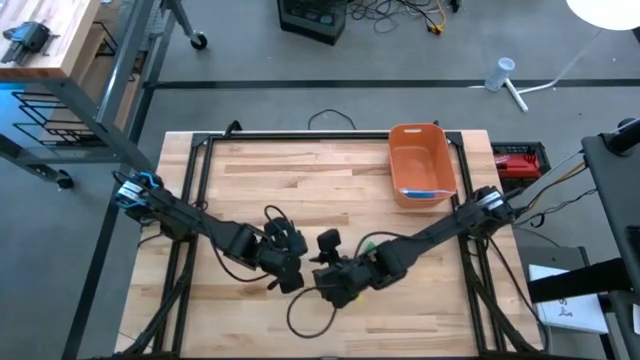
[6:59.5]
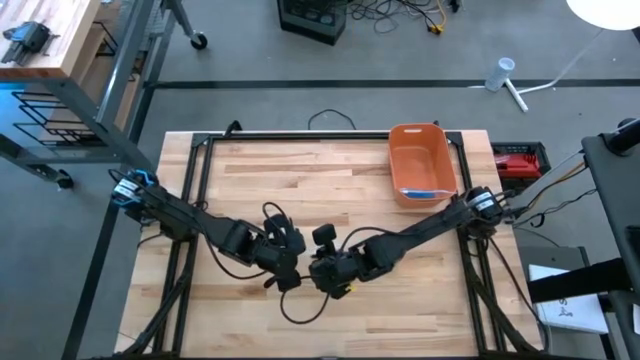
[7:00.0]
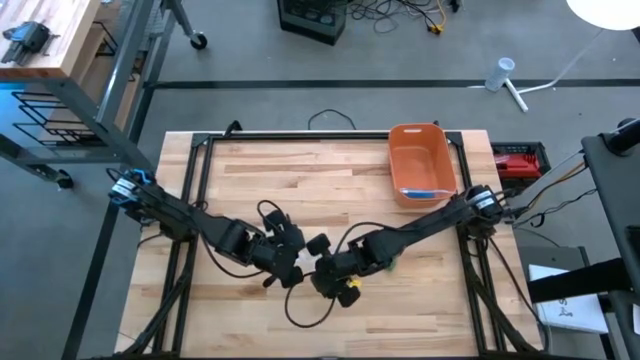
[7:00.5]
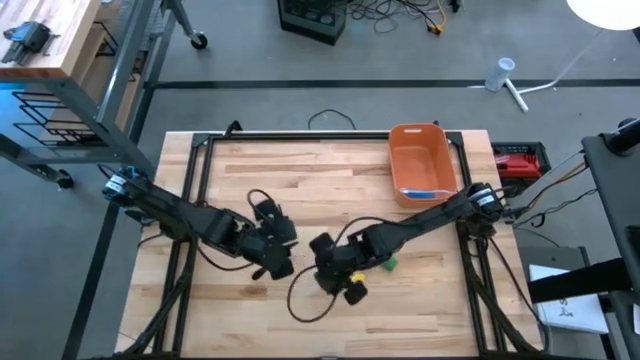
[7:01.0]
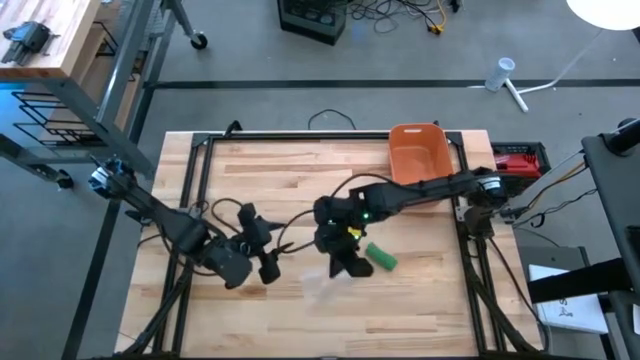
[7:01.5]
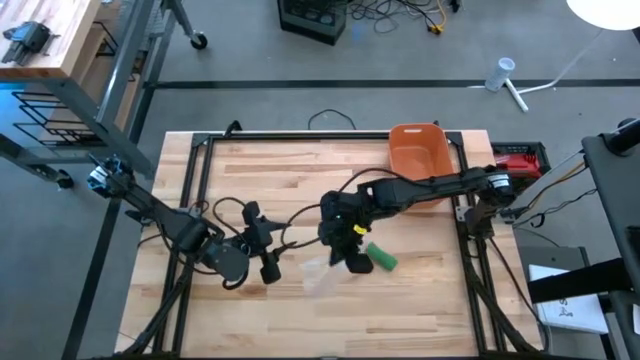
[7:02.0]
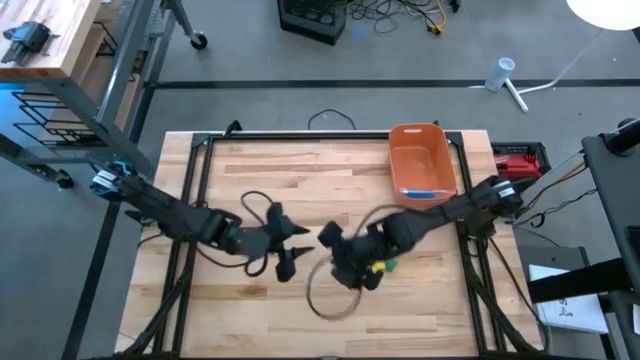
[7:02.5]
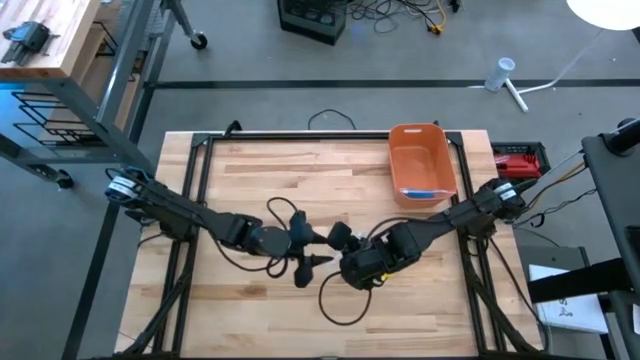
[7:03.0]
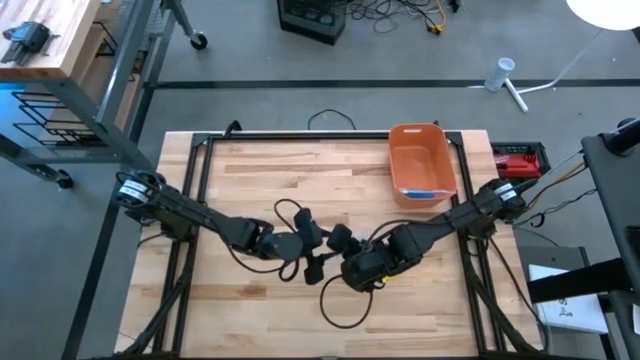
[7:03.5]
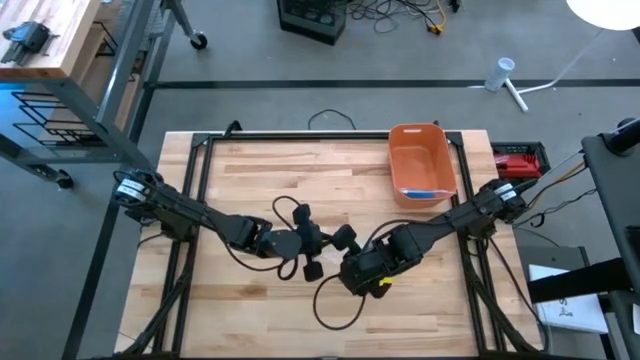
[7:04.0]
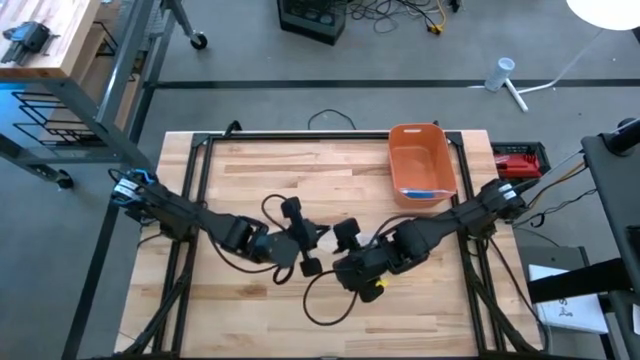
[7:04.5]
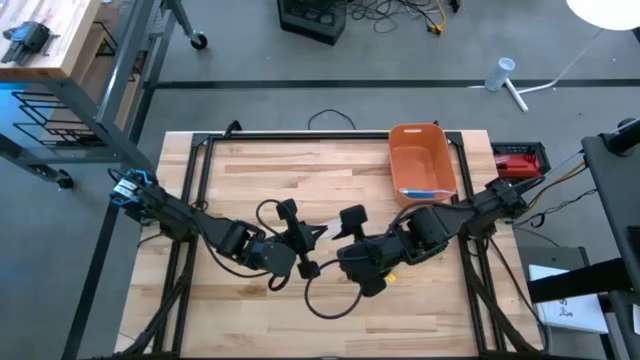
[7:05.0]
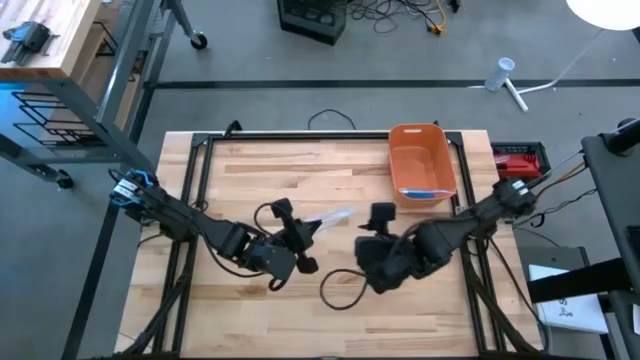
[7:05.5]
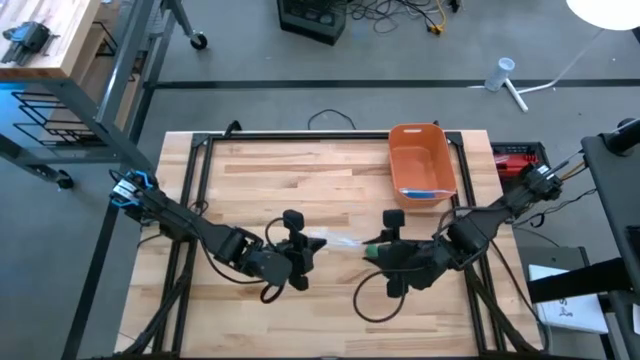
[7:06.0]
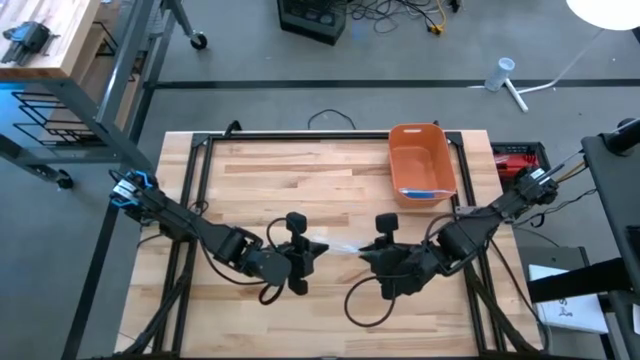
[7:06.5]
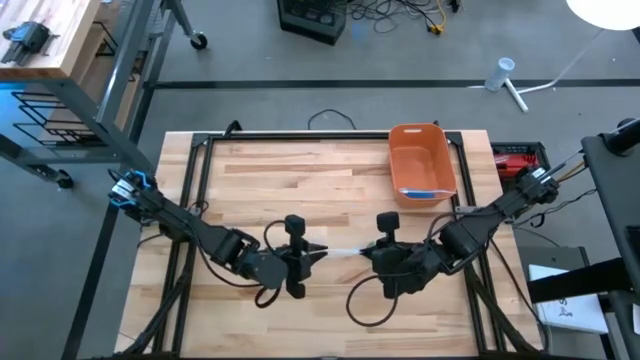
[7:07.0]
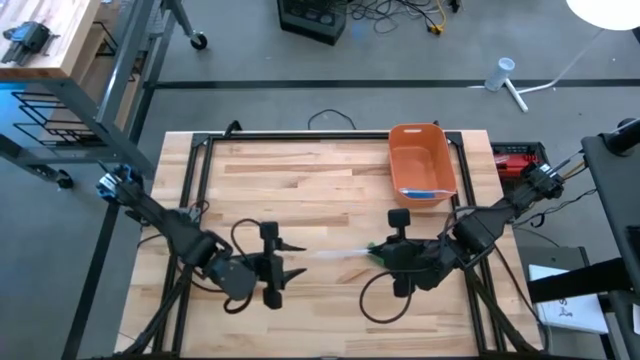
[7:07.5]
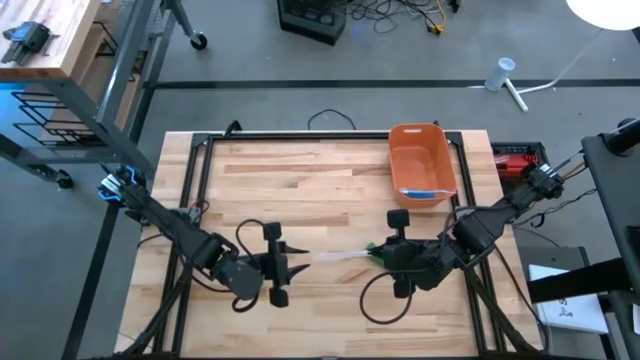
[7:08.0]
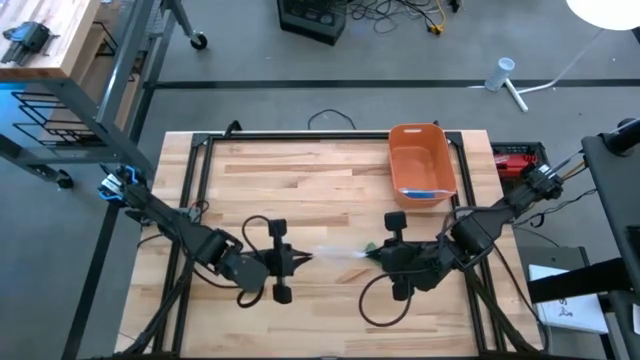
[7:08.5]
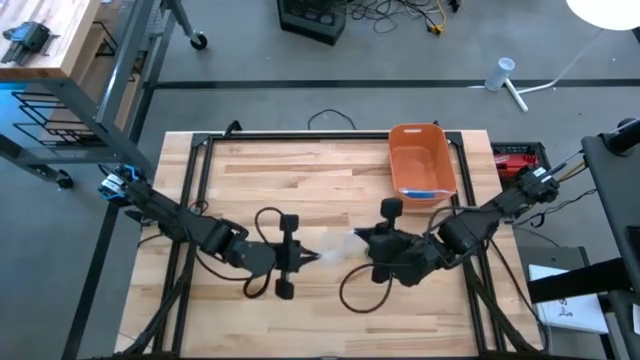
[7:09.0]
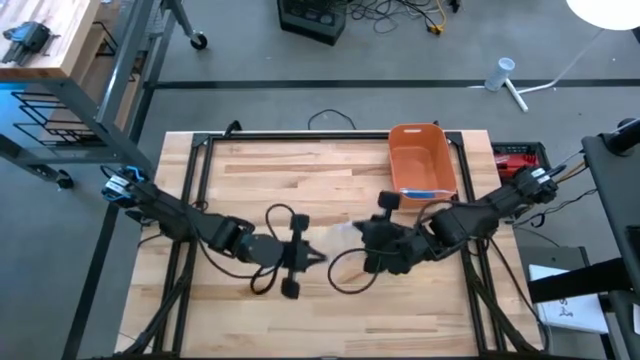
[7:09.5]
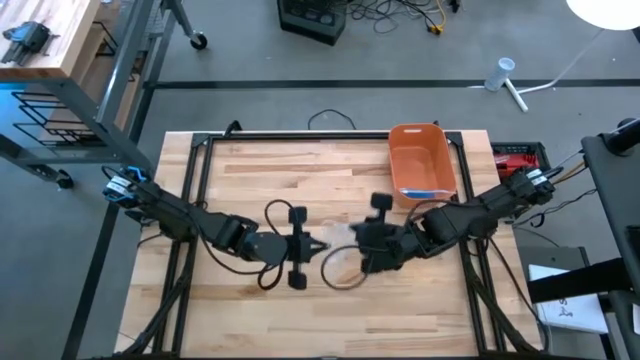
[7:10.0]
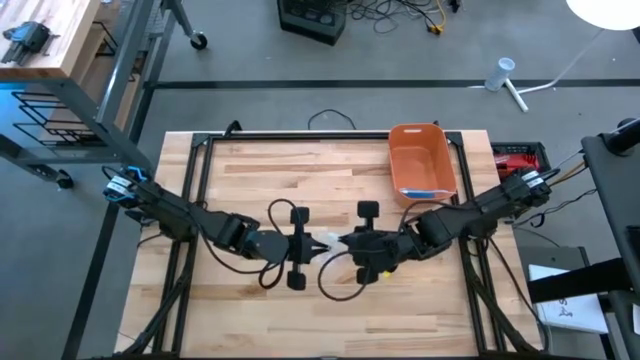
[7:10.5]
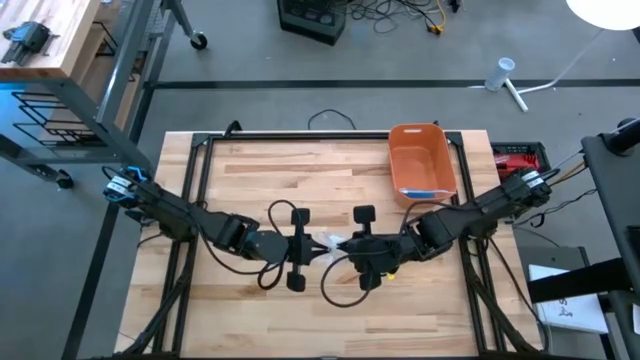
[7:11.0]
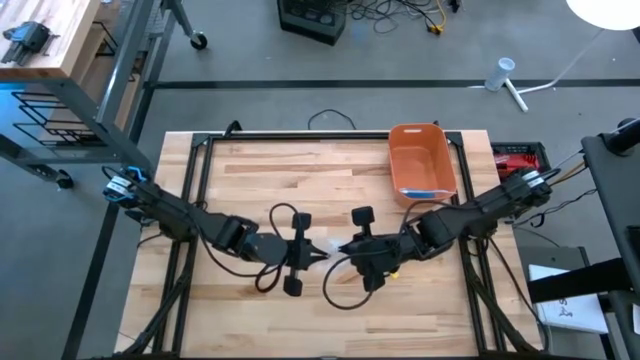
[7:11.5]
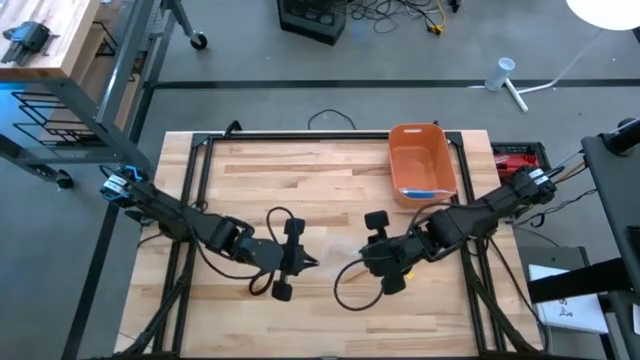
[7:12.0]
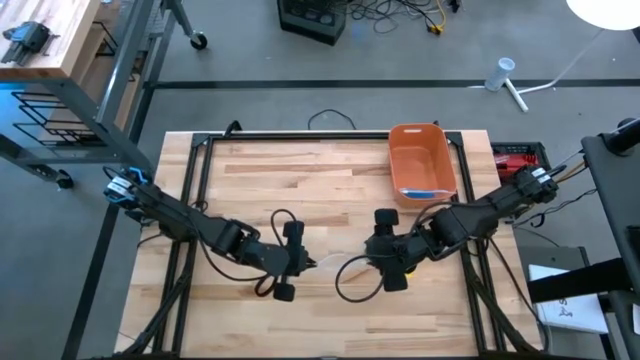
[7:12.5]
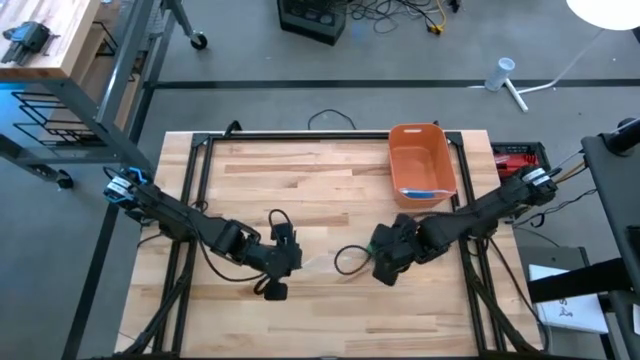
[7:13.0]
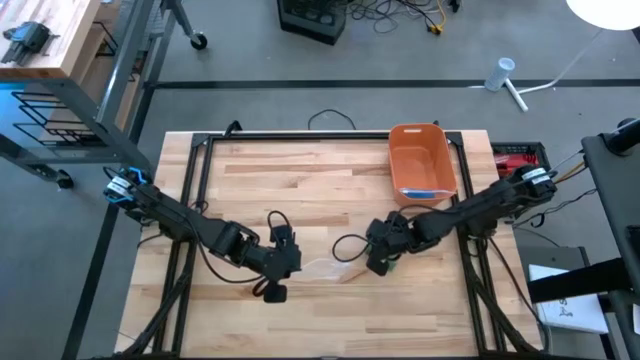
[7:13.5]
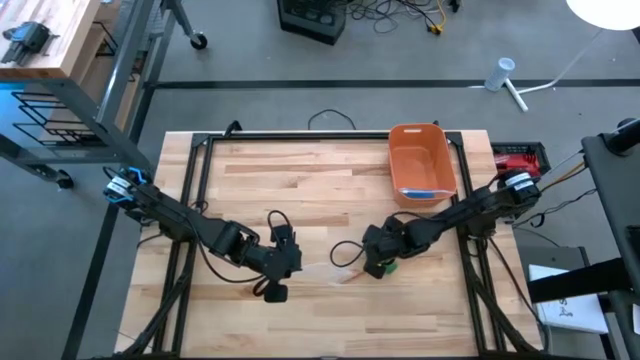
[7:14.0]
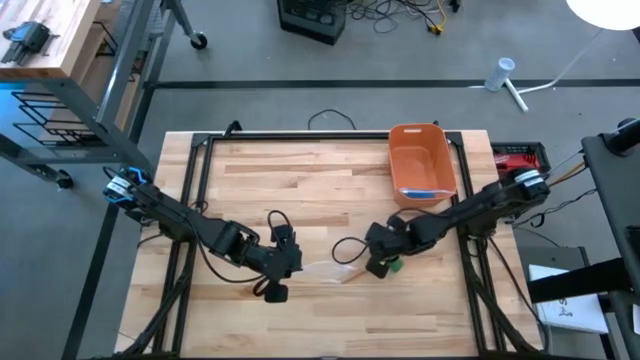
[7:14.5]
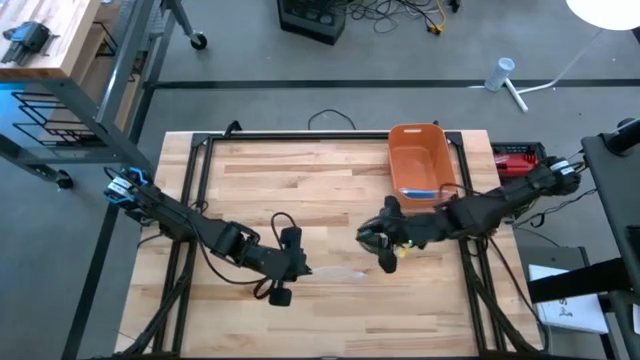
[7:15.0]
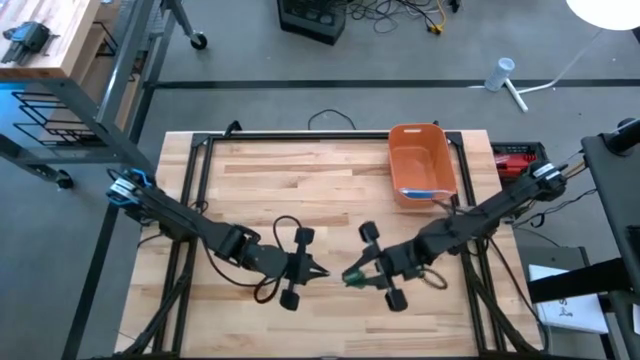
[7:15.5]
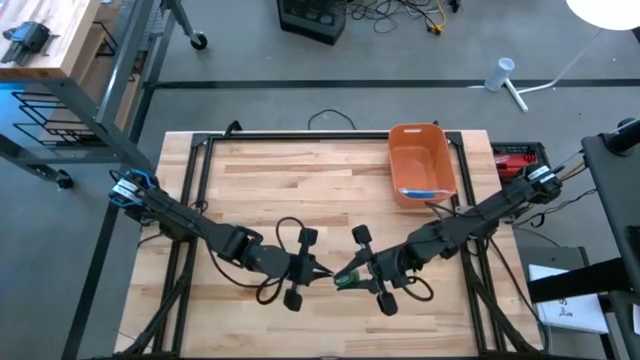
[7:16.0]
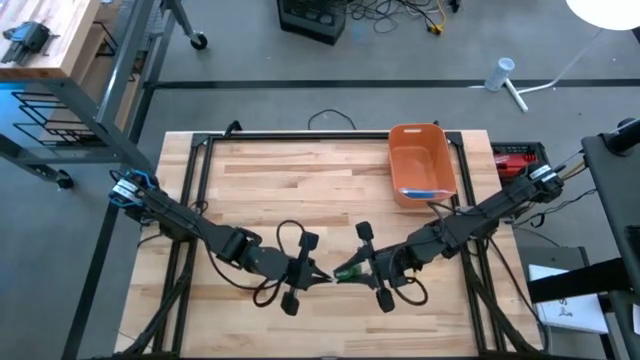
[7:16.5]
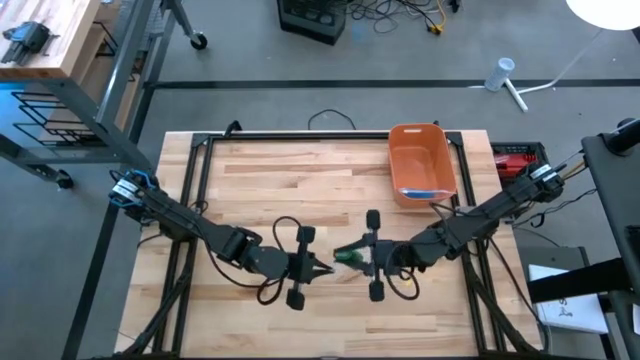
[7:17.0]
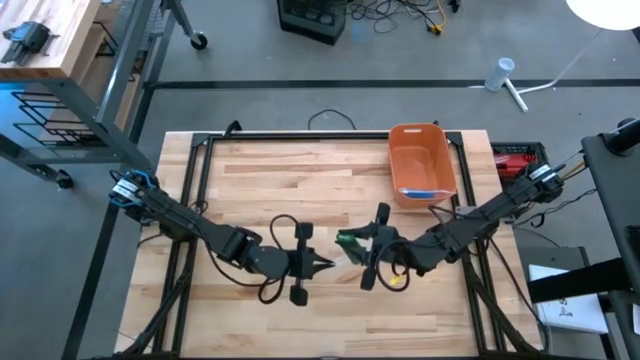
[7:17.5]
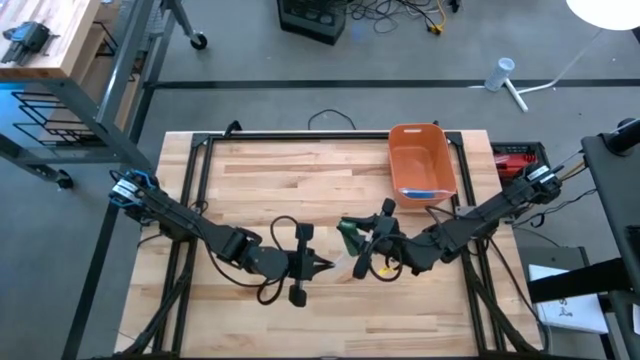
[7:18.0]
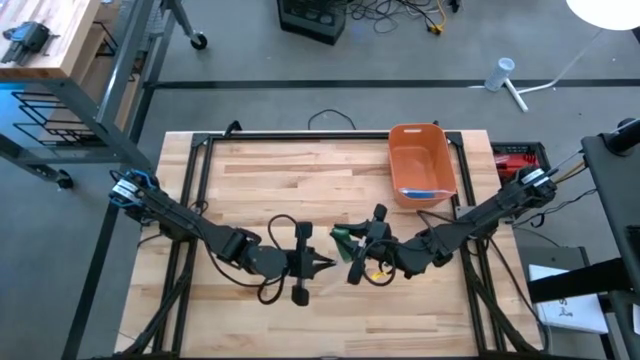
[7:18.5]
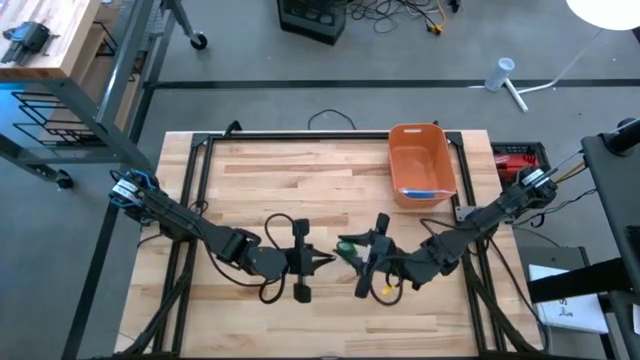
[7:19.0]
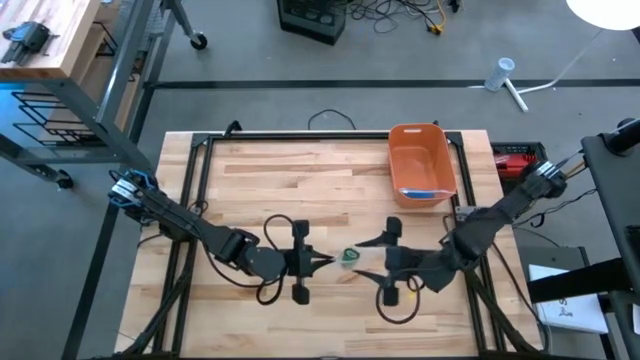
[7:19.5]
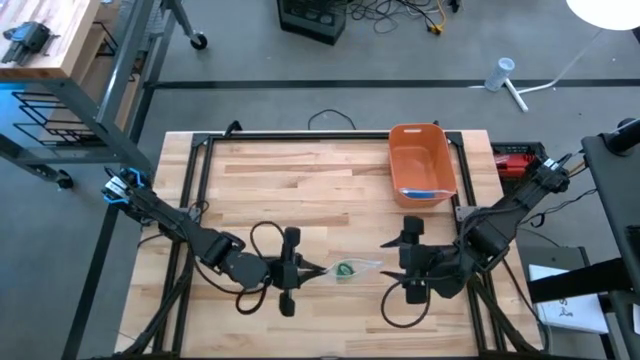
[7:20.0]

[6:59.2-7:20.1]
Task: Roll bandage
Put the green bandage into the zip bag
